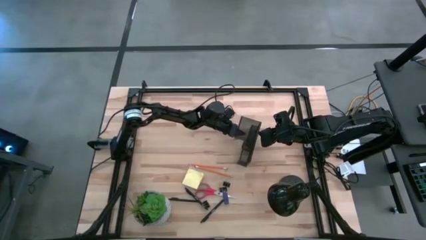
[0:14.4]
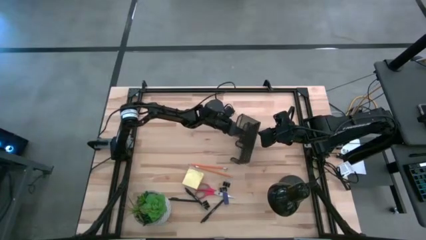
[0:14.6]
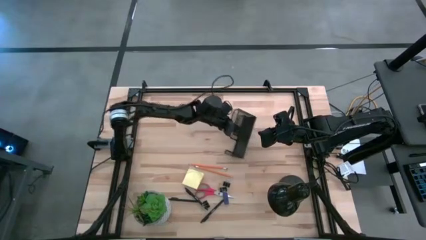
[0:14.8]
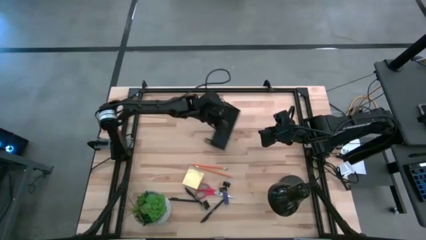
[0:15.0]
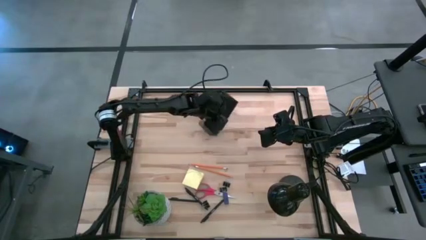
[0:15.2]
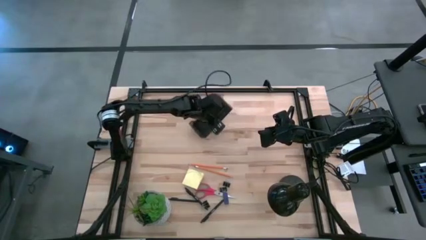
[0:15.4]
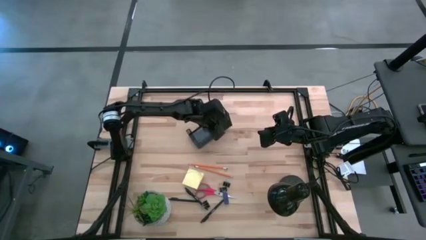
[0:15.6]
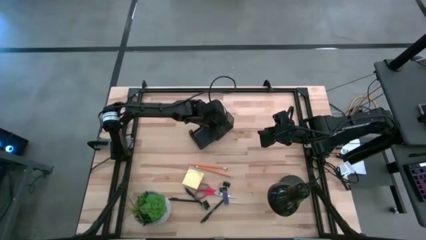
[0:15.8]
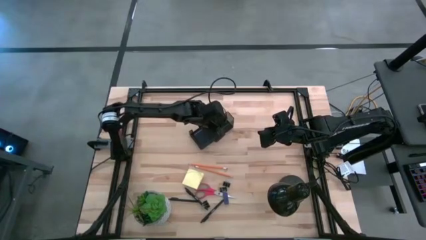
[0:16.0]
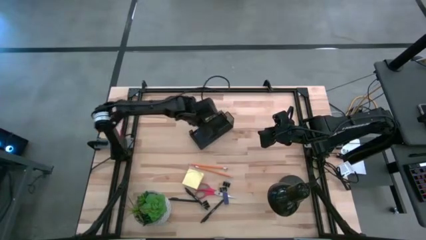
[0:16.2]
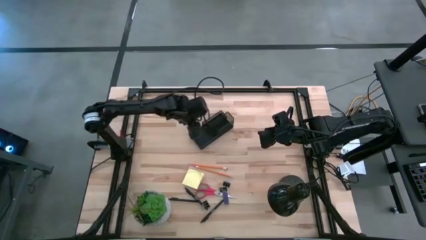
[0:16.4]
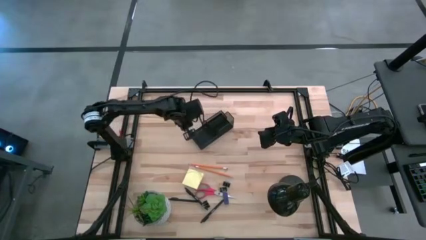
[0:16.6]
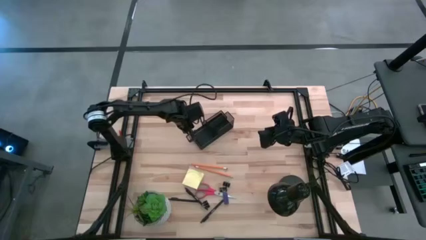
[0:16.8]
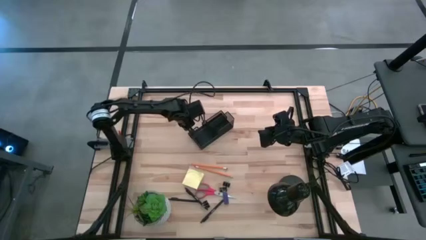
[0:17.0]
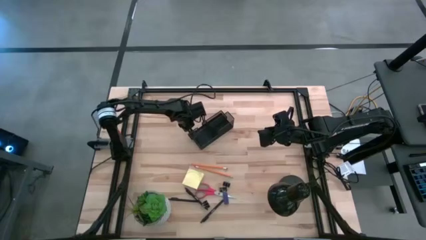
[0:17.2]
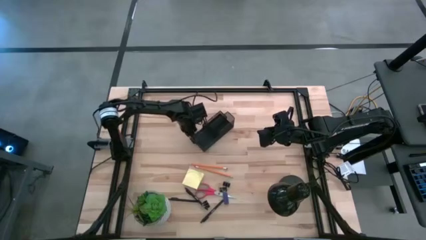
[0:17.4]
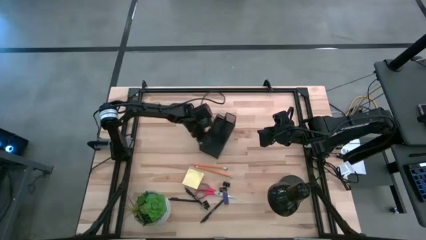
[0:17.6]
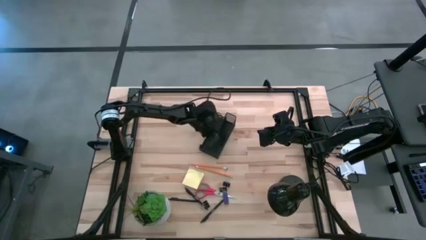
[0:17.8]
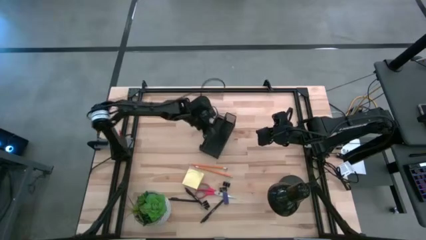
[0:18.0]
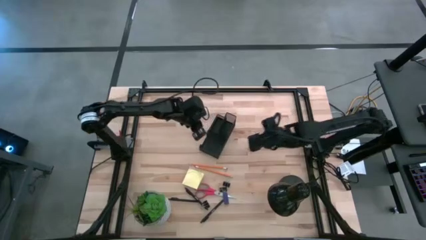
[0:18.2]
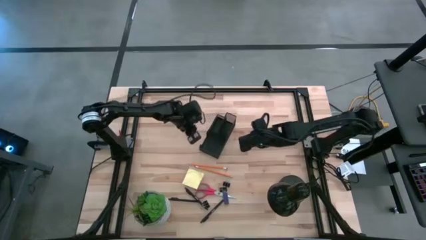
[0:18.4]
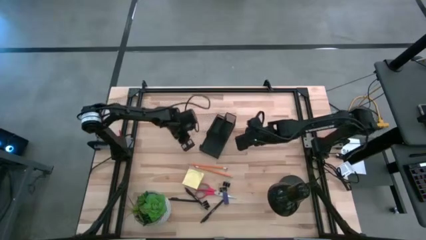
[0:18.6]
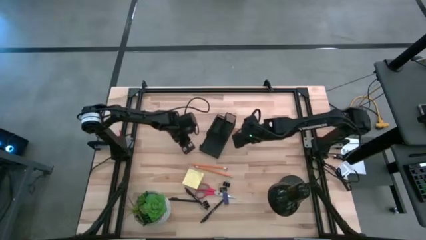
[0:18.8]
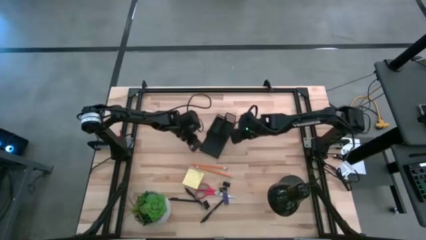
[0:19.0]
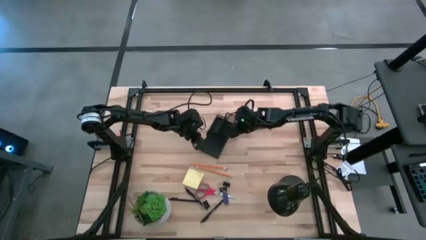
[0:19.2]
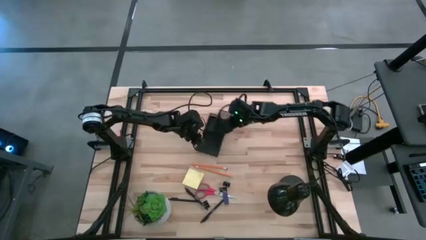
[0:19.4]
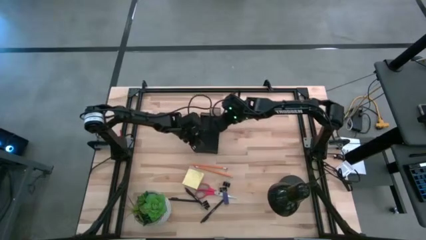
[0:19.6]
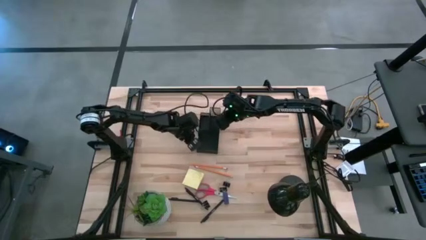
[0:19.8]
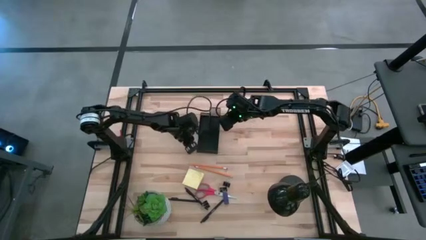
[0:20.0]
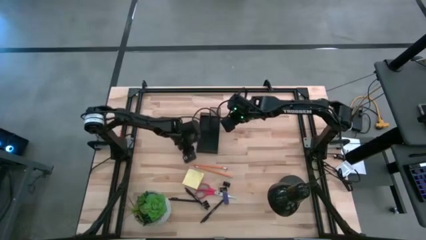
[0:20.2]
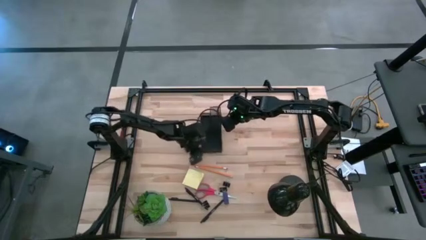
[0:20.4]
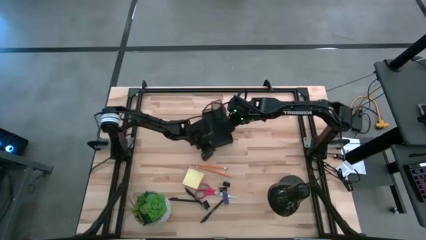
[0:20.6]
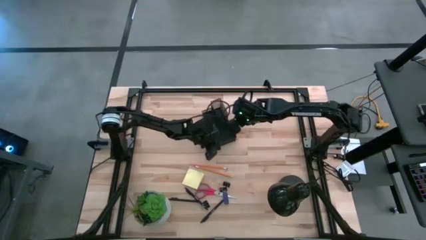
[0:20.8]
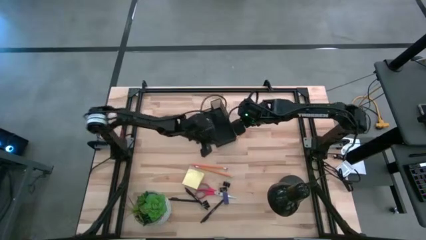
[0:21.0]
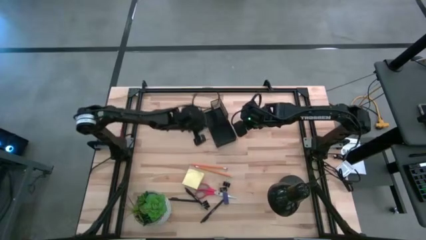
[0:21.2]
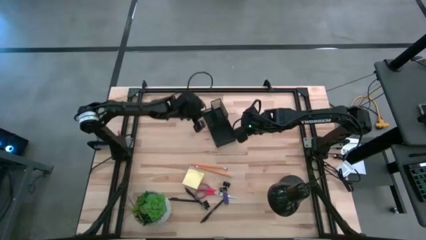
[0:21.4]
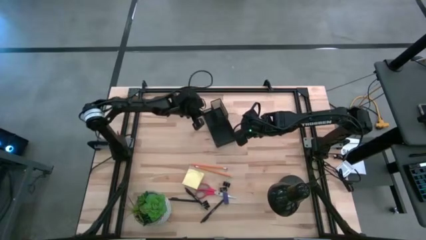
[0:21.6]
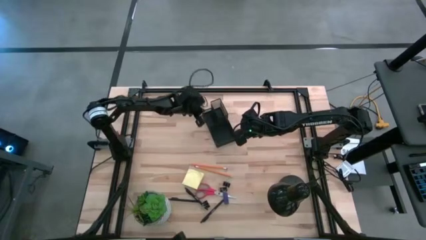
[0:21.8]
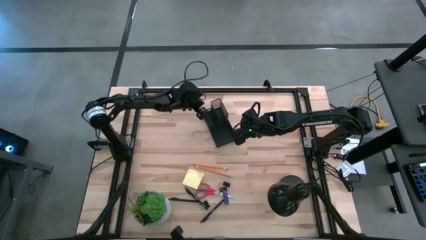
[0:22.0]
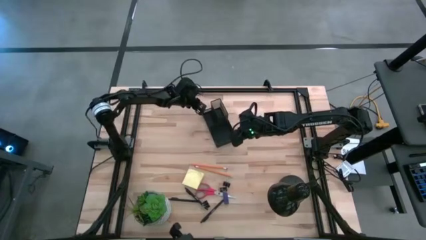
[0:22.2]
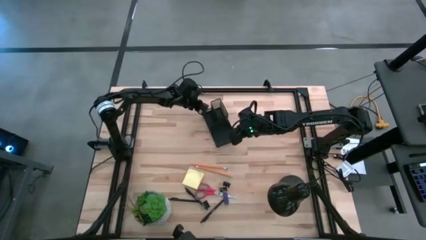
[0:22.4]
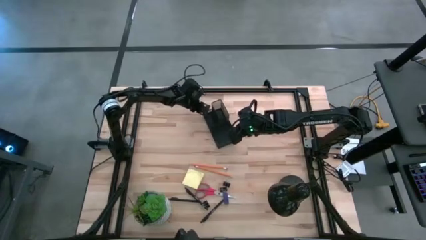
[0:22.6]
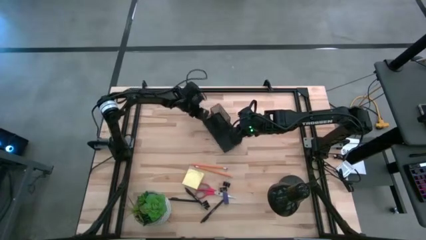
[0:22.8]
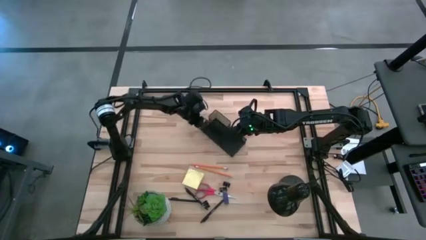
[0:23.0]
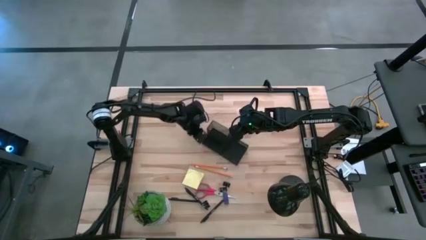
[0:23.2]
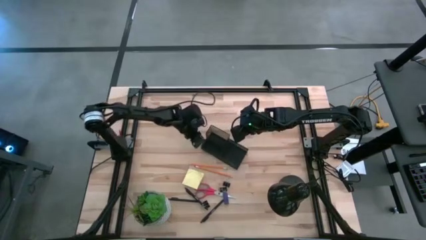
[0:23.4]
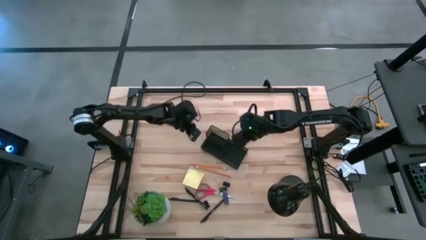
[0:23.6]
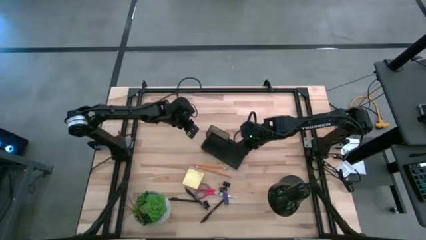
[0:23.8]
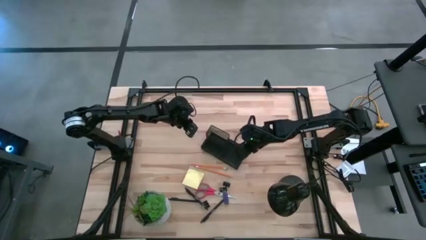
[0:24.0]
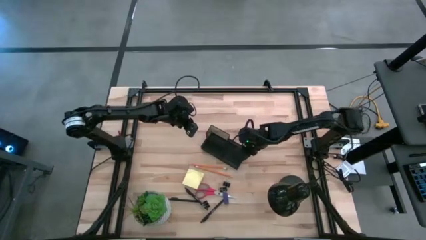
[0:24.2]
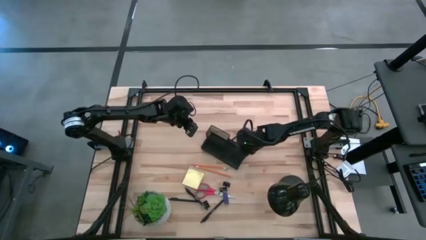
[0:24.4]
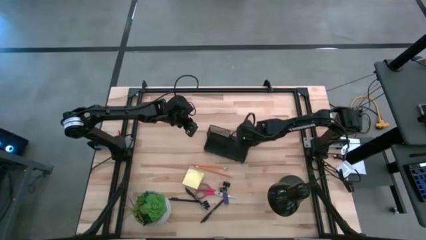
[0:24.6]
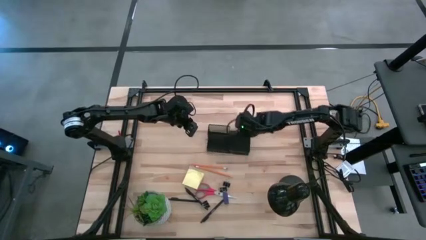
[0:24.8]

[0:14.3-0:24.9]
Task: Pick and place office supplies into organizer
Adjust the desk organizer

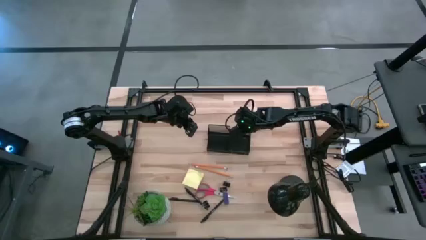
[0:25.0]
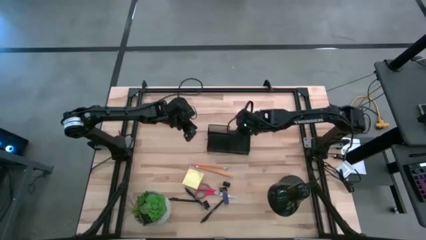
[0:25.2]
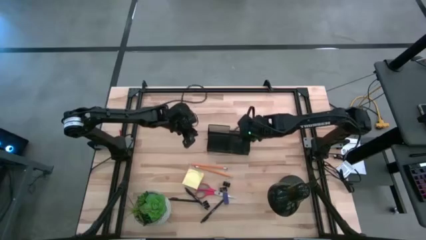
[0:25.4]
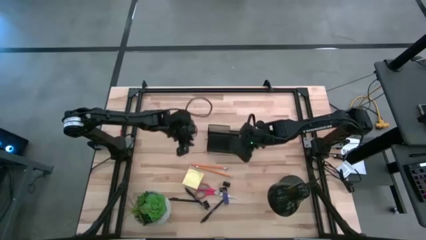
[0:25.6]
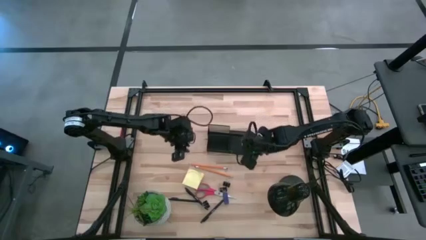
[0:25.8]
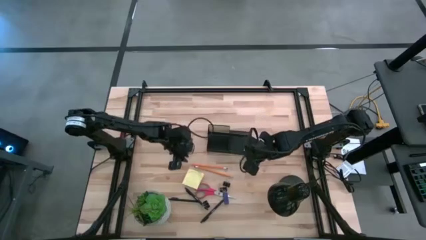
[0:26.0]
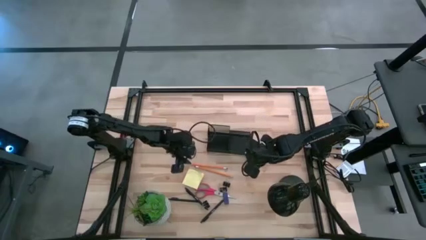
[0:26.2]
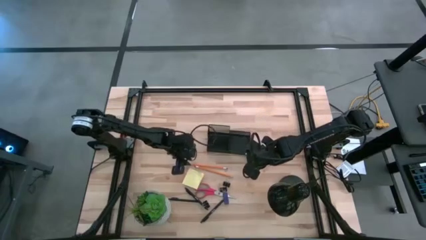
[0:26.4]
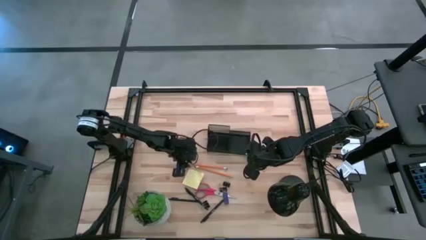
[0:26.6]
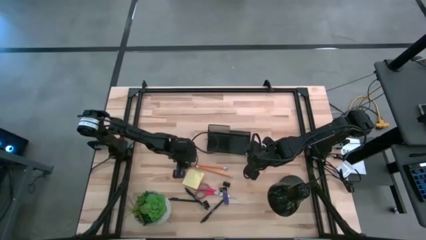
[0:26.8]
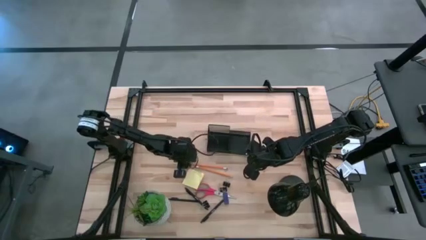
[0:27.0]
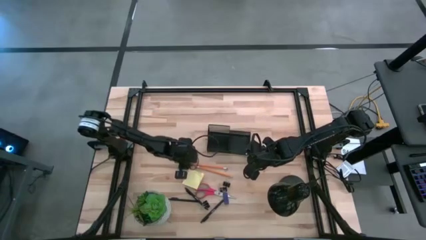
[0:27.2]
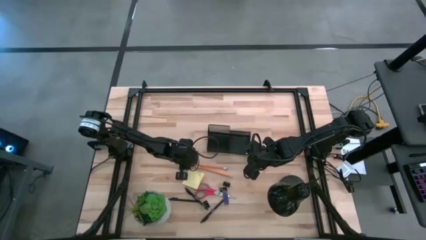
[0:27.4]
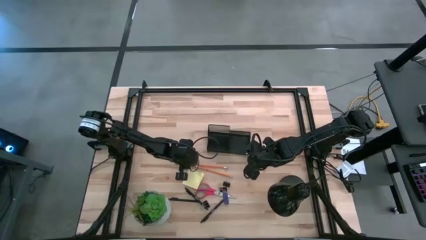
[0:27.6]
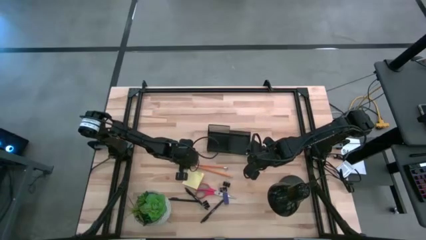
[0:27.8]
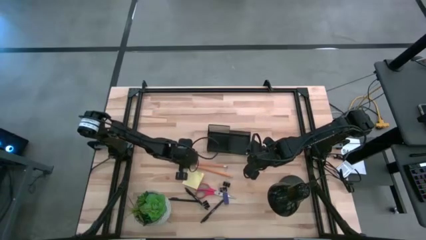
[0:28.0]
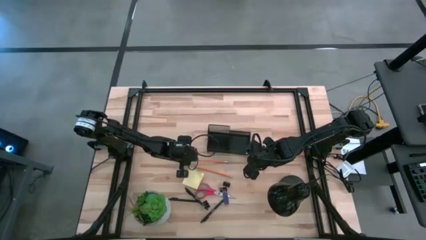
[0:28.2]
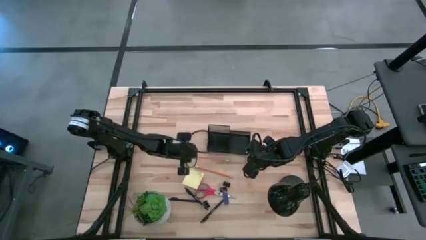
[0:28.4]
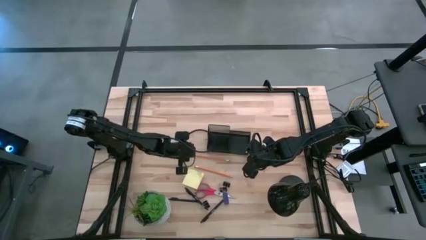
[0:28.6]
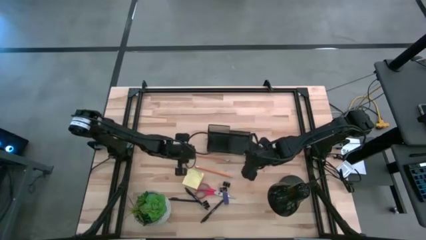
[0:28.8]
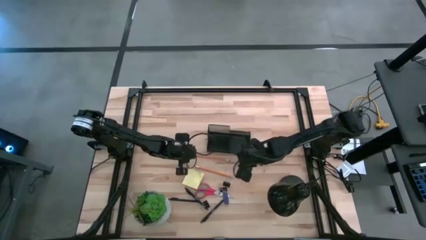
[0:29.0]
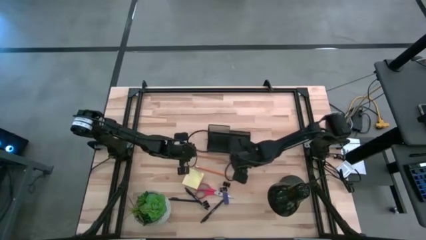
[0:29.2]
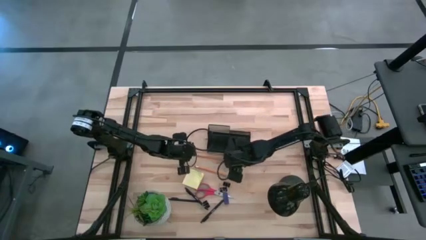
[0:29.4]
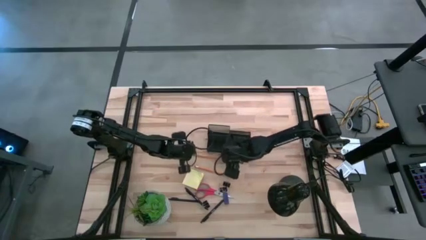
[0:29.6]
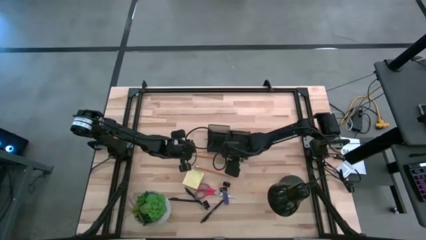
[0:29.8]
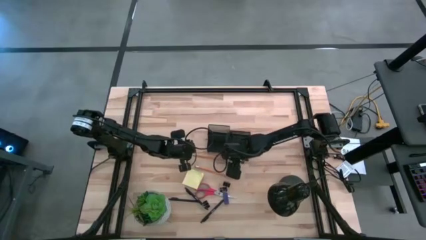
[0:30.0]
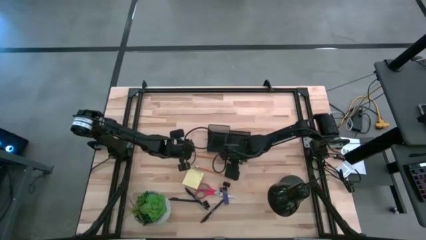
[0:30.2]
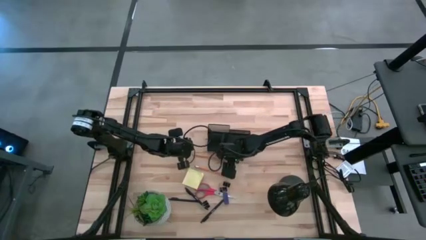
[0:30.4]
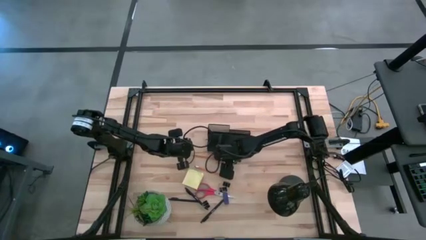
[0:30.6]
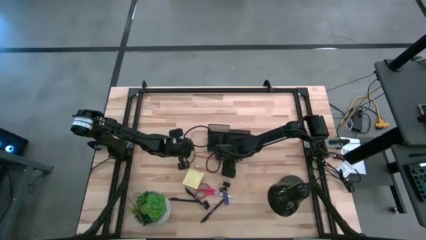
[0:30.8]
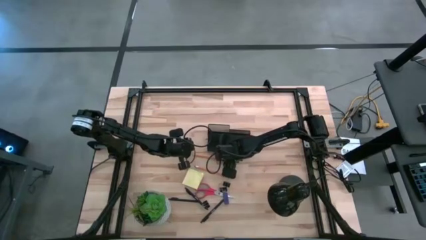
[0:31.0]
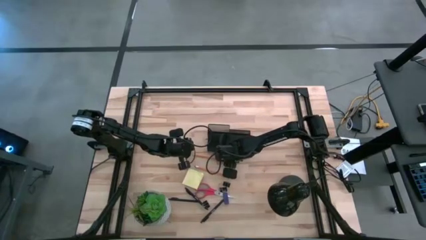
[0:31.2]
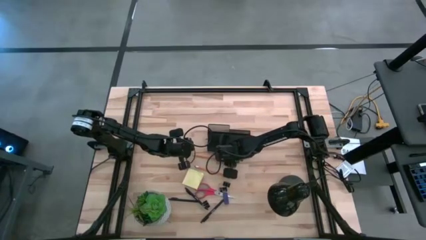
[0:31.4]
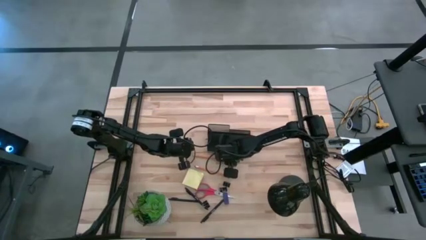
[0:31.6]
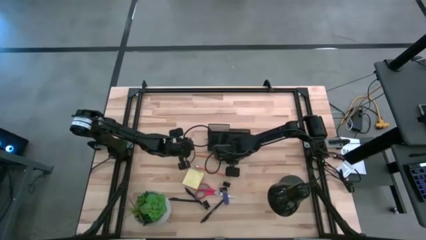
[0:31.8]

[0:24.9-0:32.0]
Put the top orange pencil into the desk organizer
